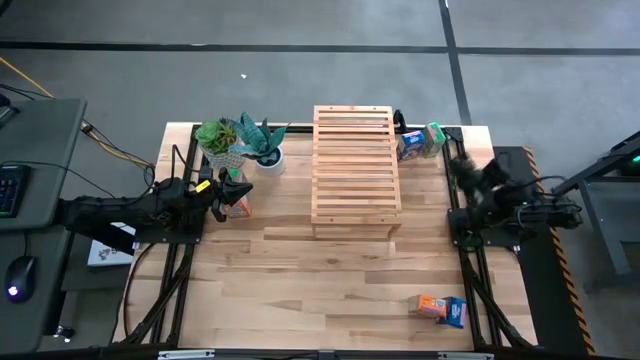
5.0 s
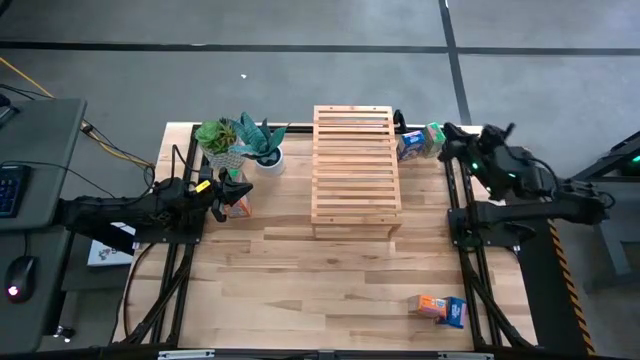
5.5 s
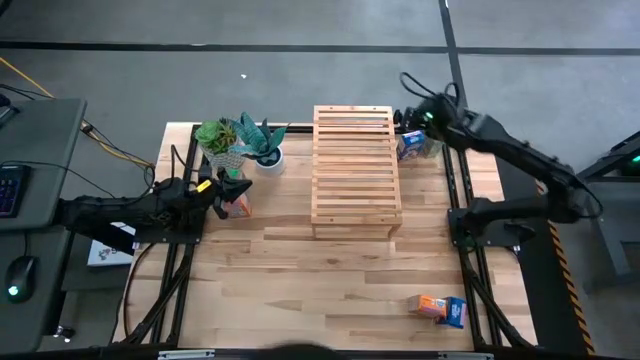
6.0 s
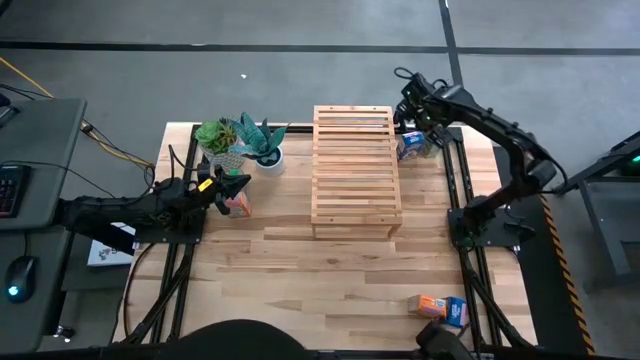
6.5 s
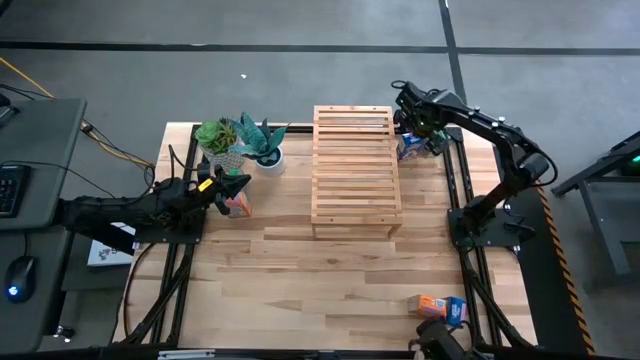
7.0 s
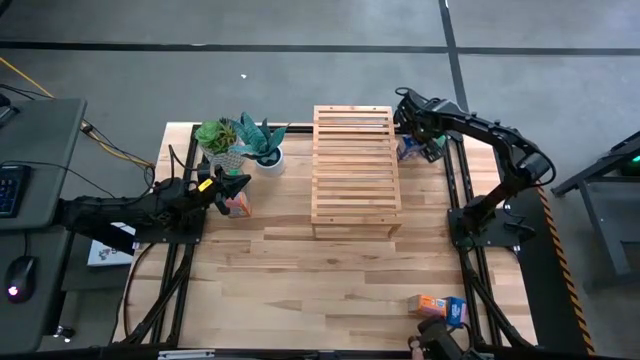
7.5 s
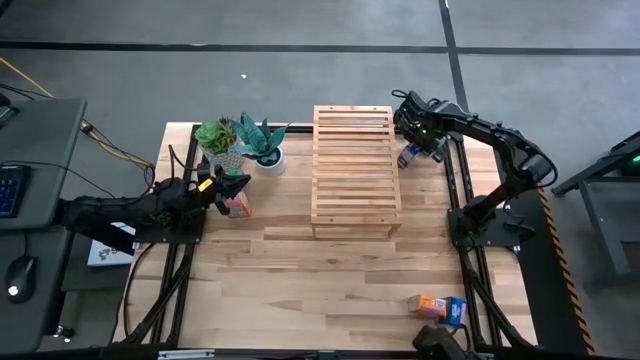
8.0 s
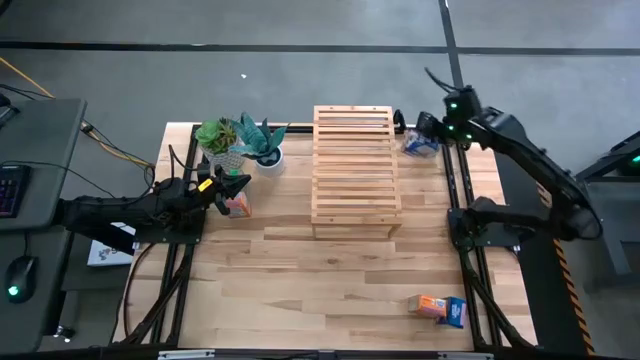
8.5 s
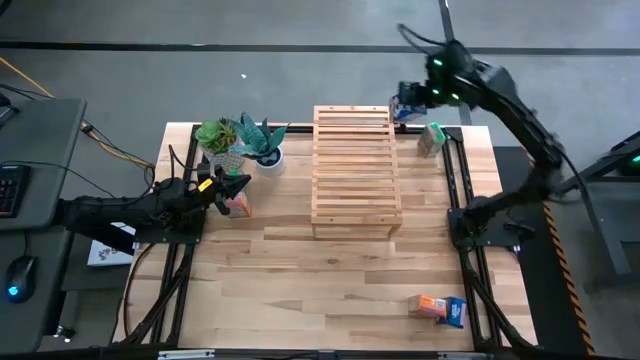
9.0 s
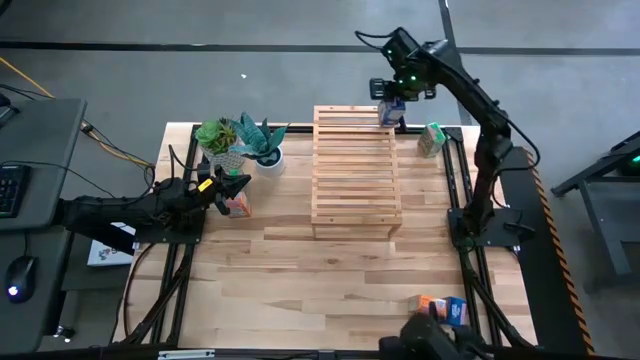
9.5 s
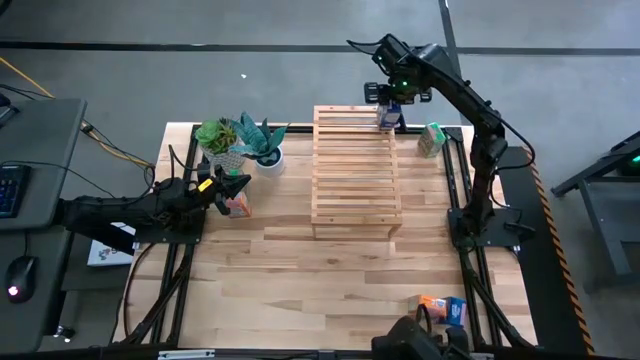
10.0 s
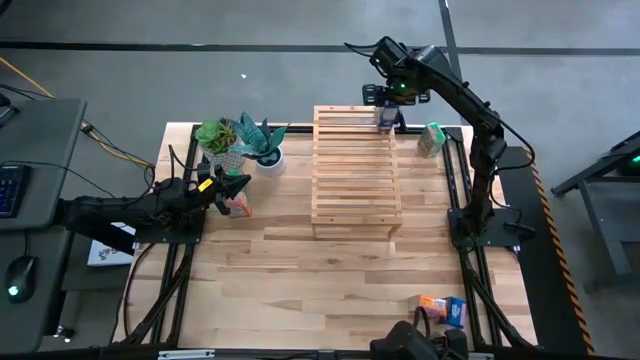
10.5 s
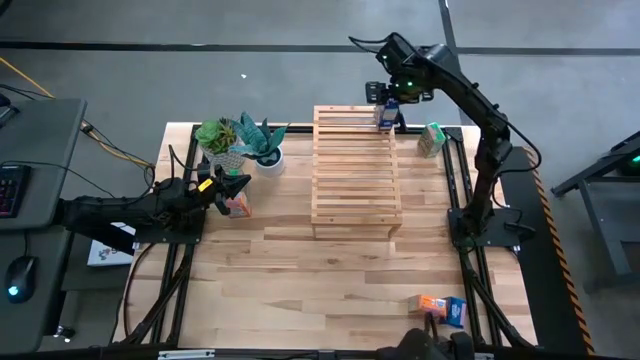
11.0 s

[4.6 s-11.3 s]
Task: Stack cereal on shelf
Put the top blue cereal box on the shelf

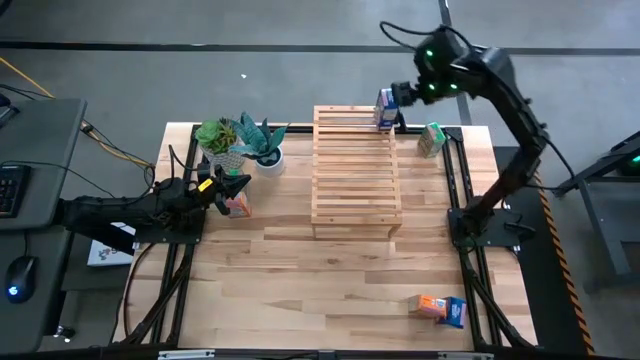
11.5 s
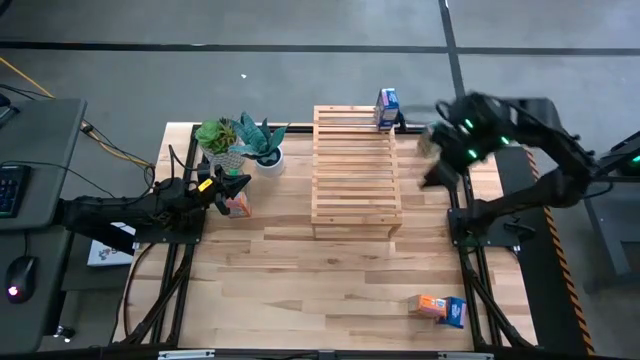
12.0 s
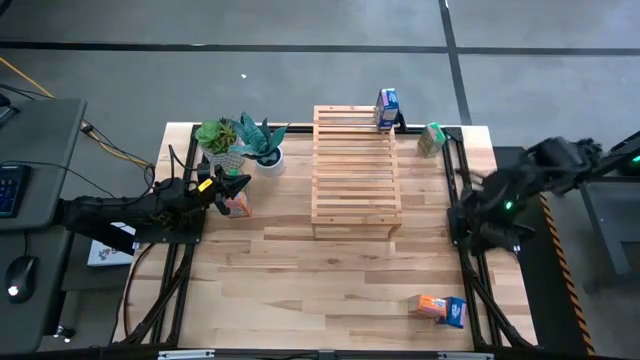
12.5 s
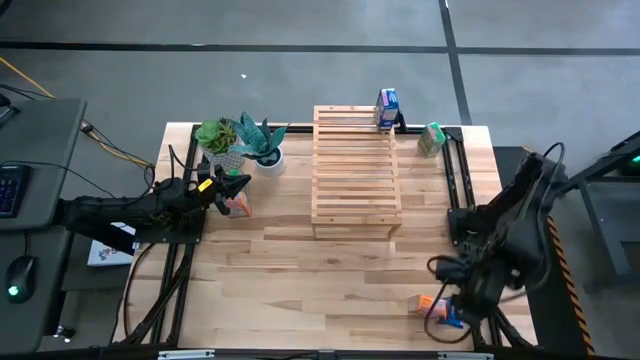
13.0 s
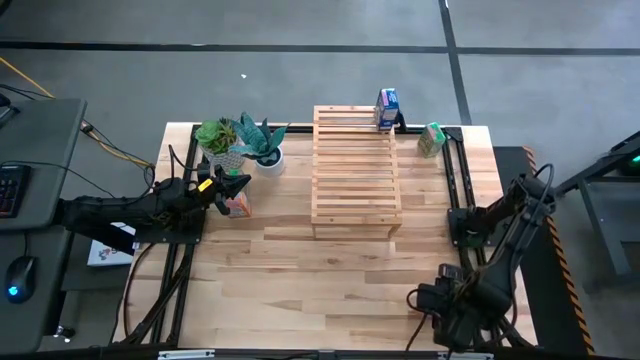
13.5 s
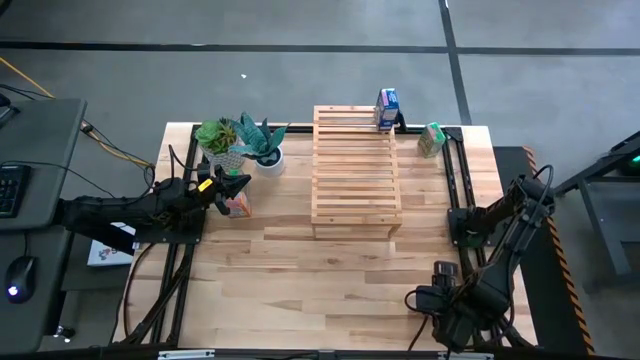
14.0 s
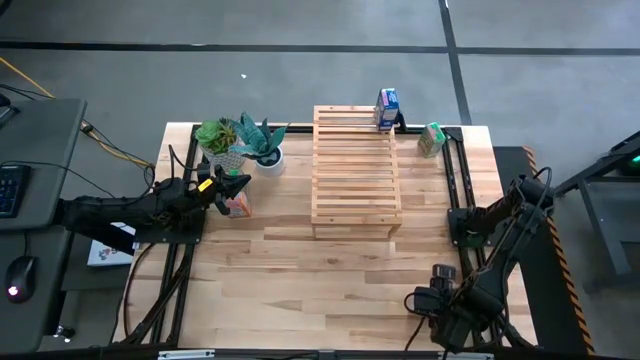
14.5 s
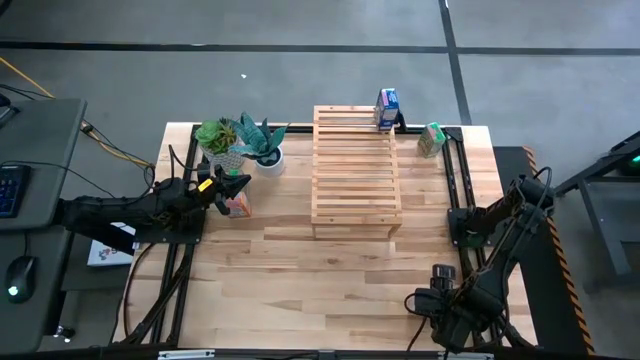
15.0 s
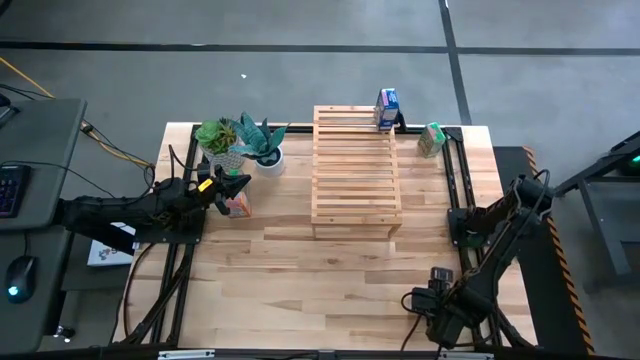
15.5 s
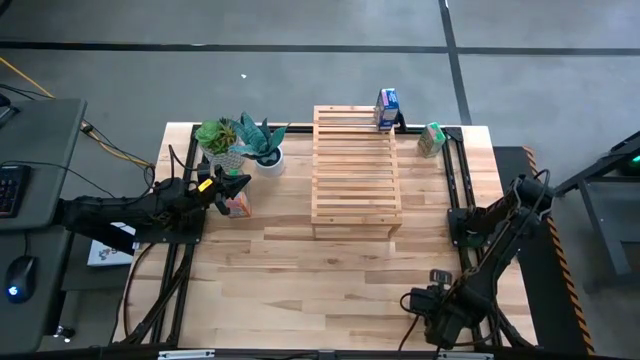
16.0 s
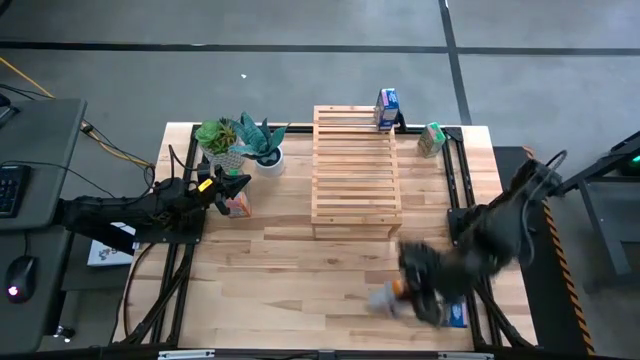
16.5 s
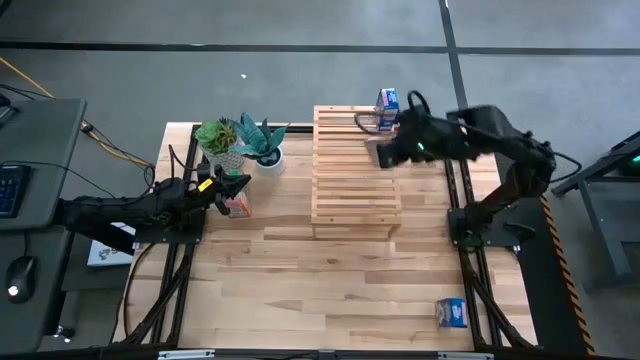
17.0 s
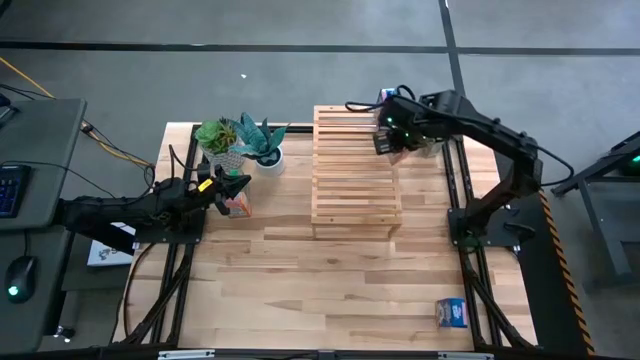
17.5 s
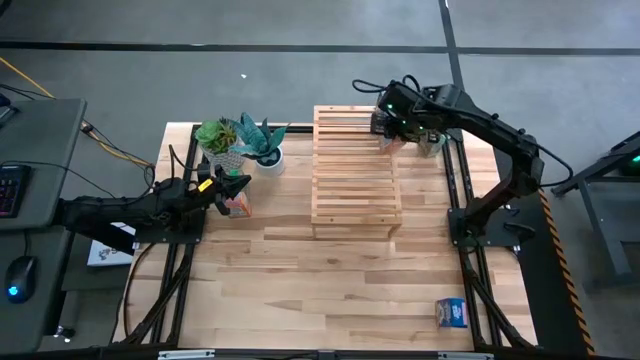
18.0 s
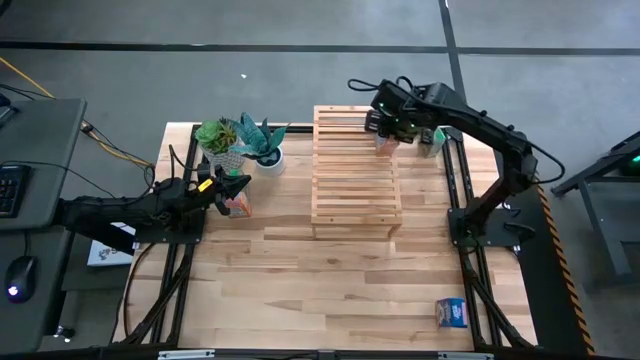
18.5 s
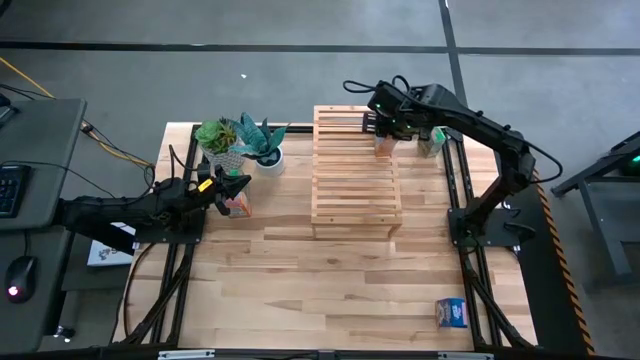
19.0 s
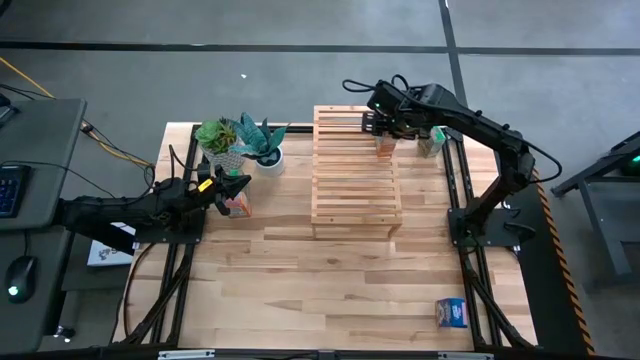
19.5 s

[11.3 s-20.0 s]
Put the bottom orange cereal box on the shelf

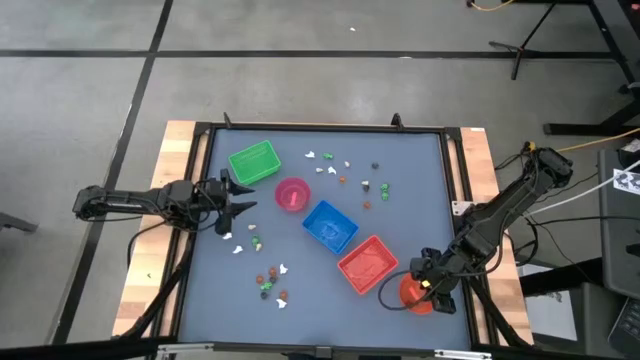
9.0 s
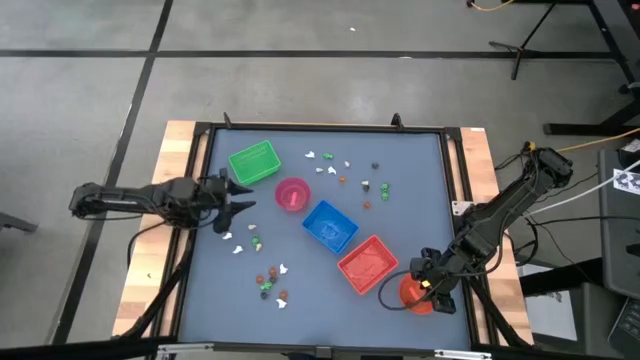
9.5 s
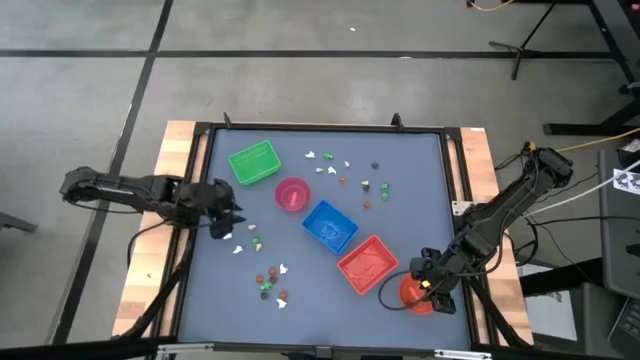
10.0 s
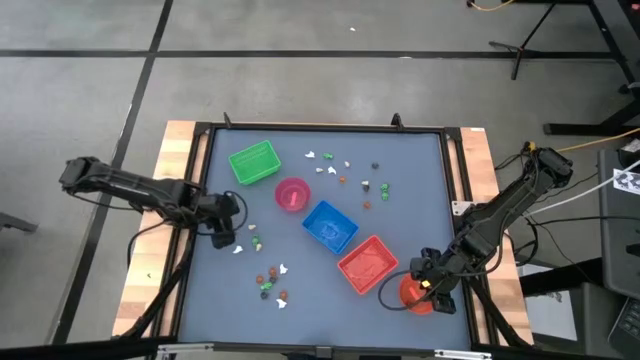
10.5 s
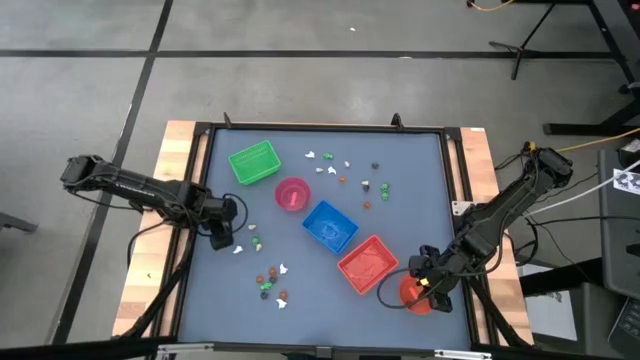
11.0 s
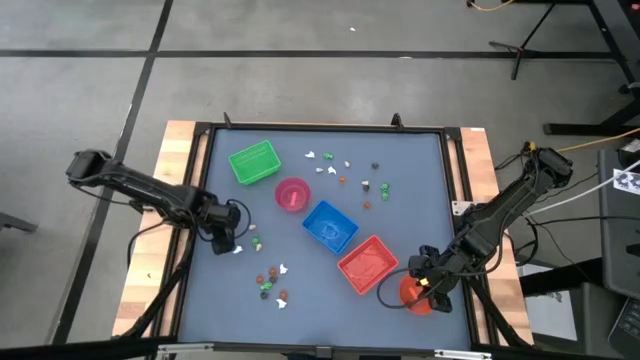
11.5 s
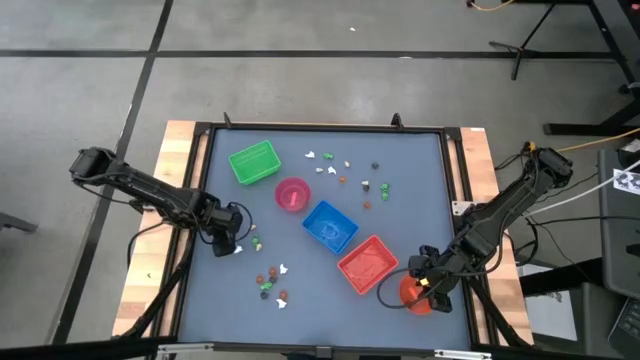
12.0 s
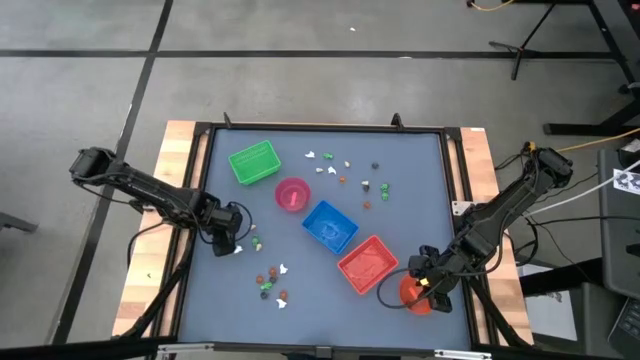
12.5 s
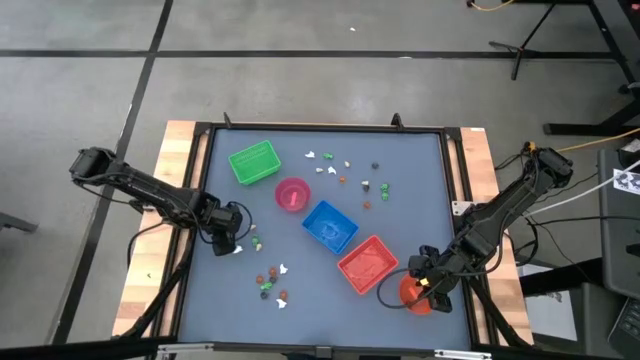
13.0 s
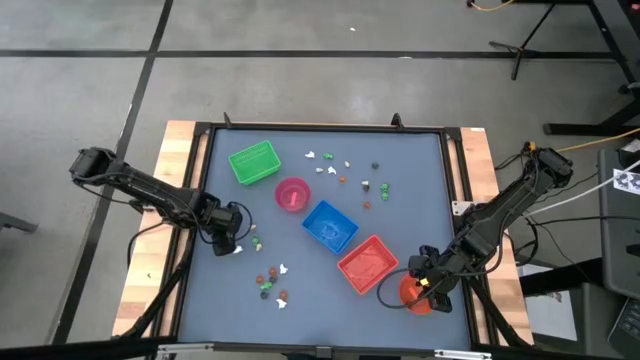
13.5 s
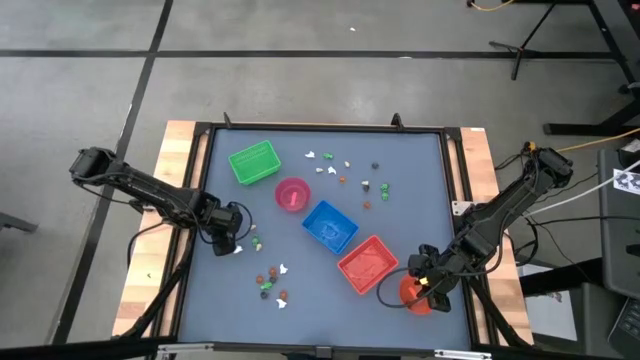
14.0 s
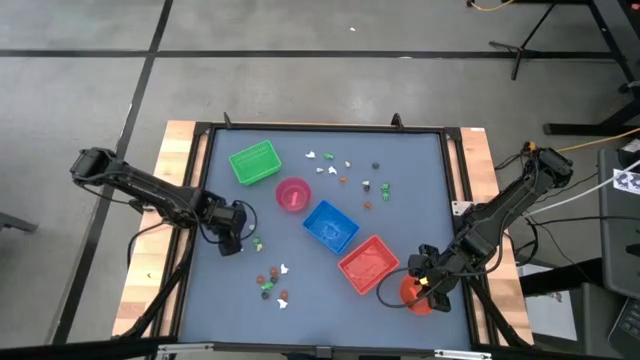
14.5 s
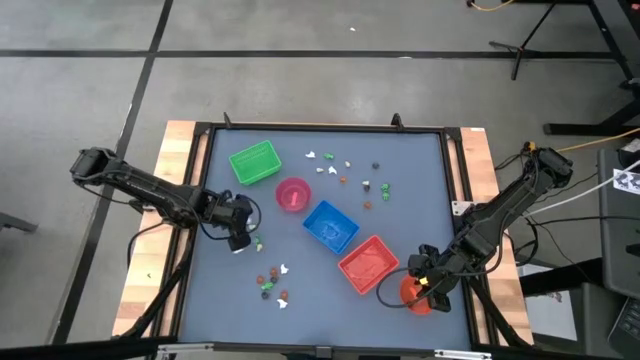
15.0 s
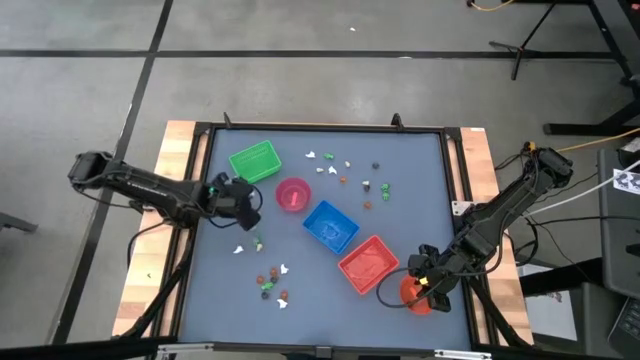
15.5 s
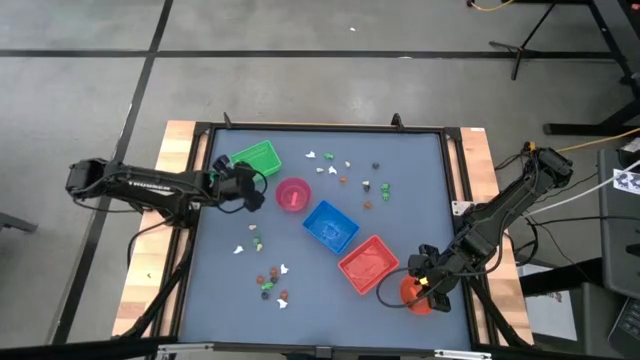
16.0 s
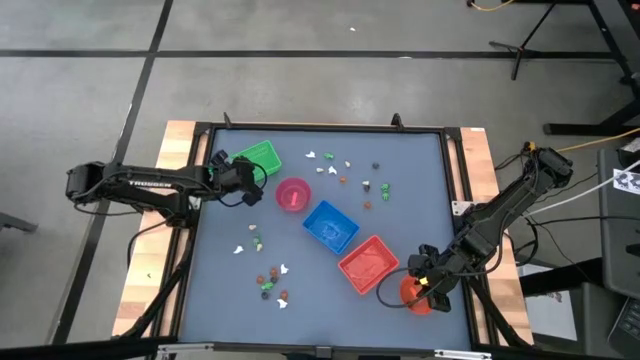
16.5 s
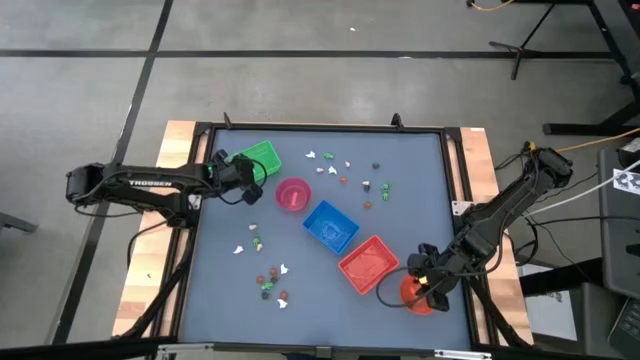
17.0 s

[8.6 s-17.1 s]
Task: Sort Halloween decoration
Put the white ghost toy into the green bin
